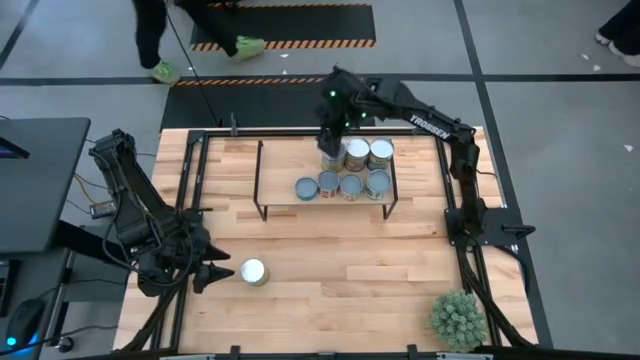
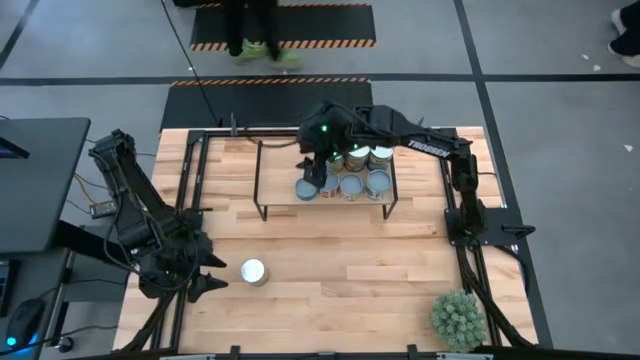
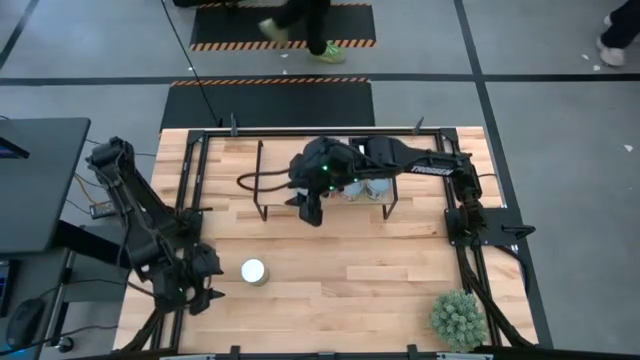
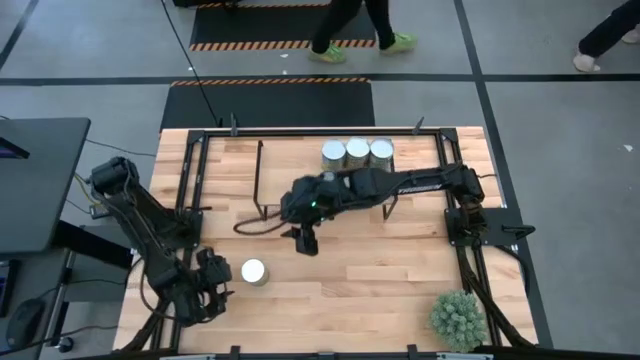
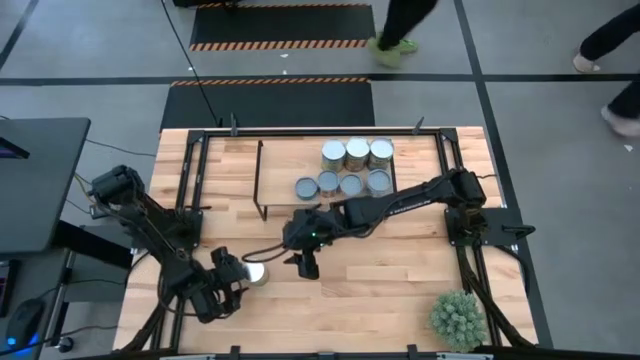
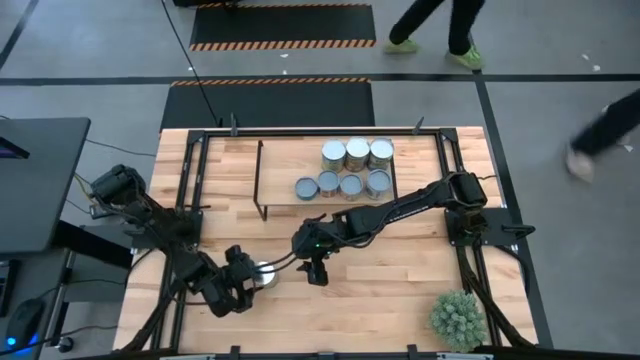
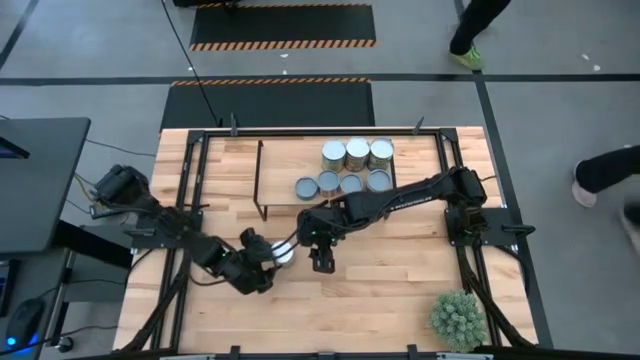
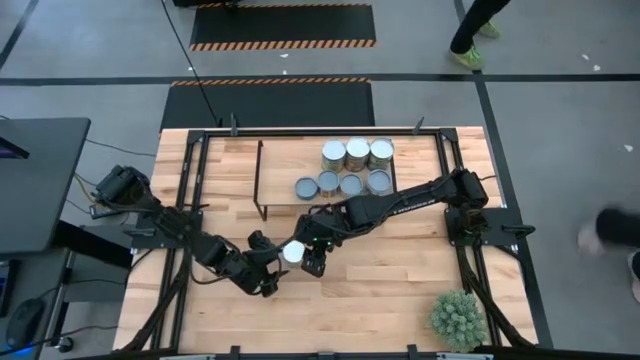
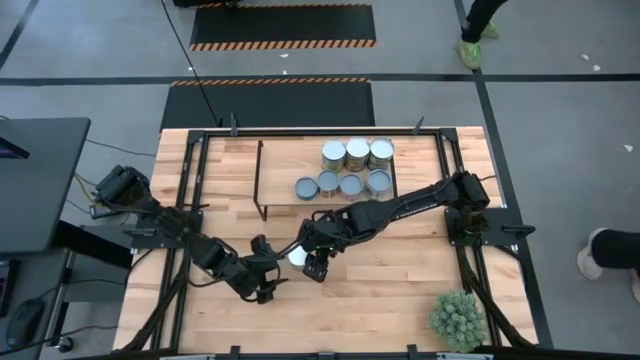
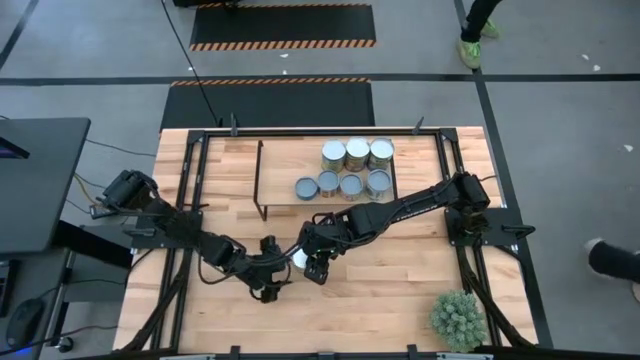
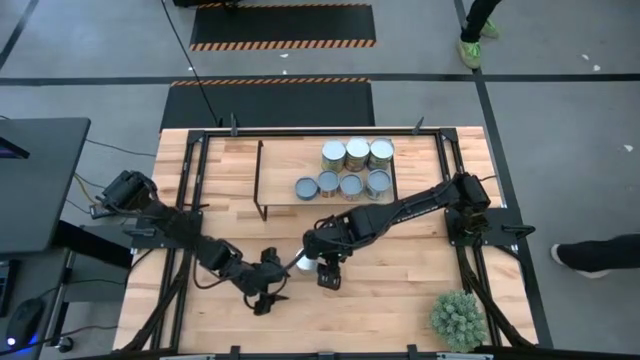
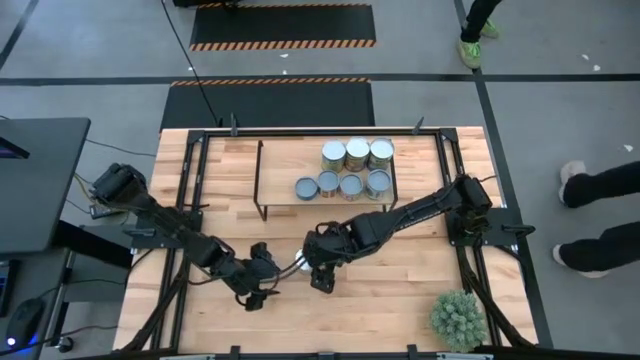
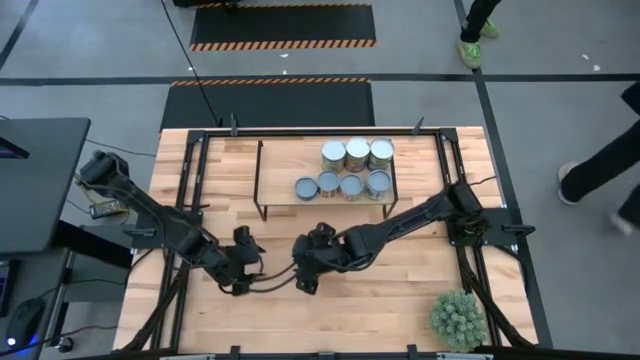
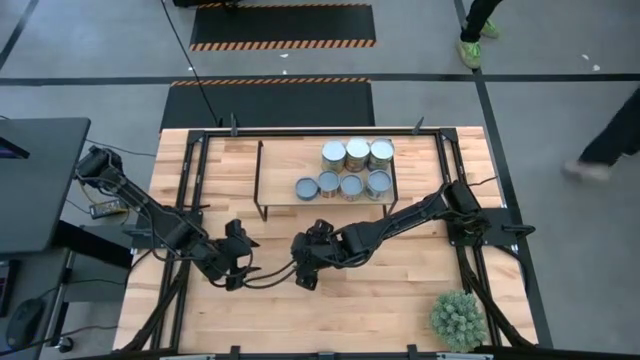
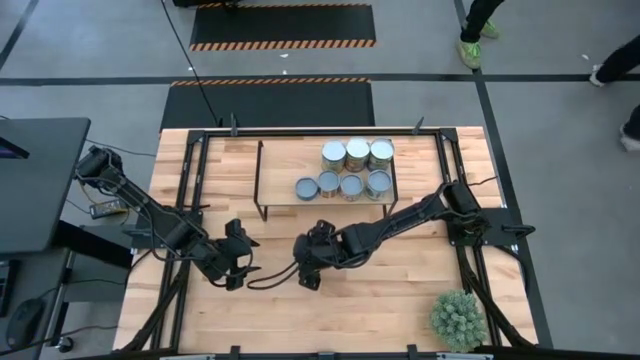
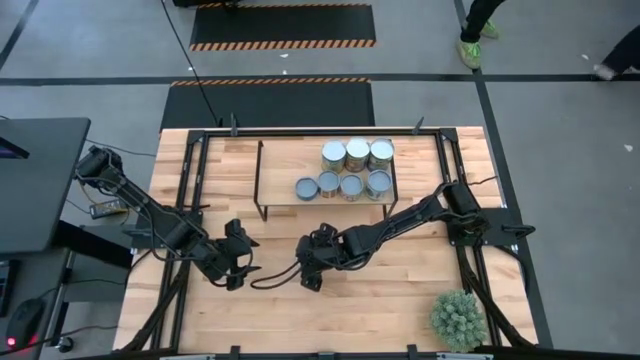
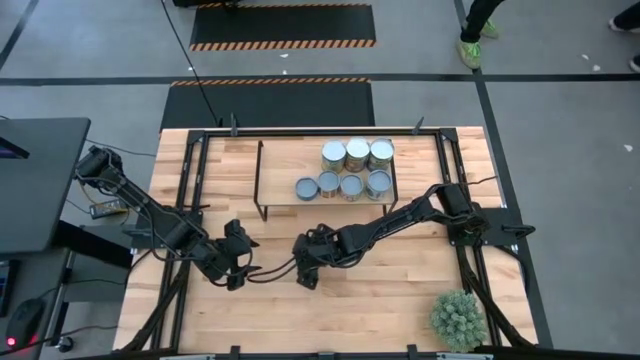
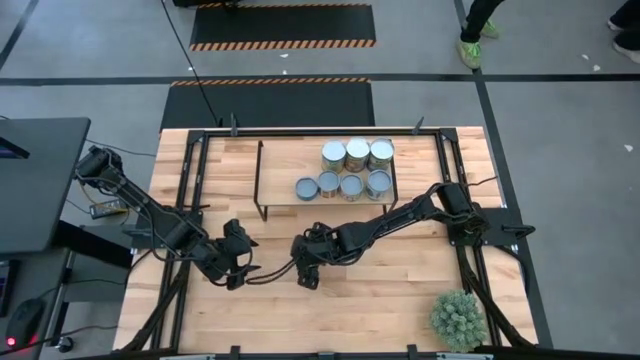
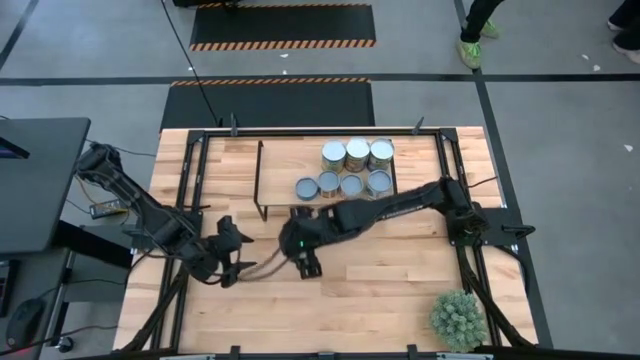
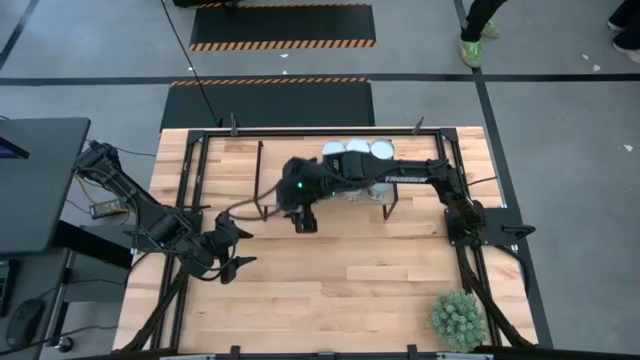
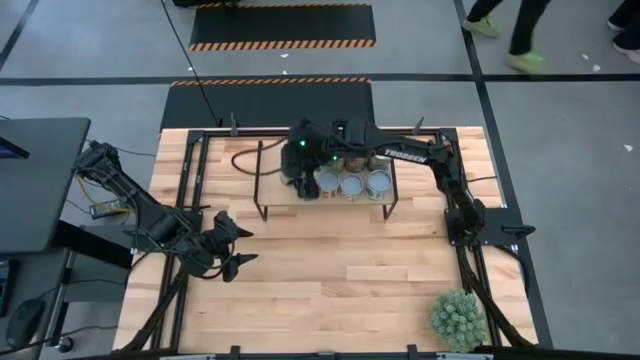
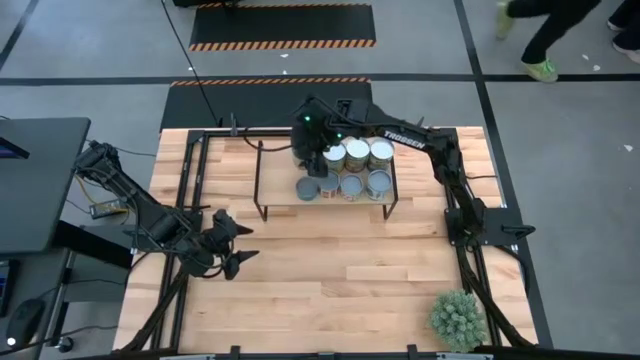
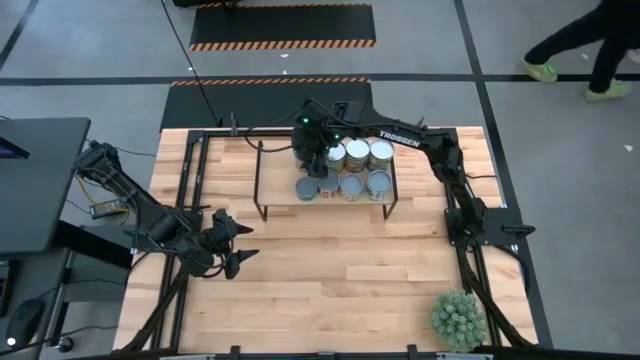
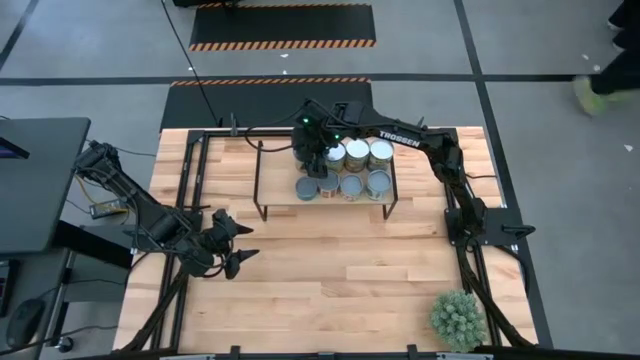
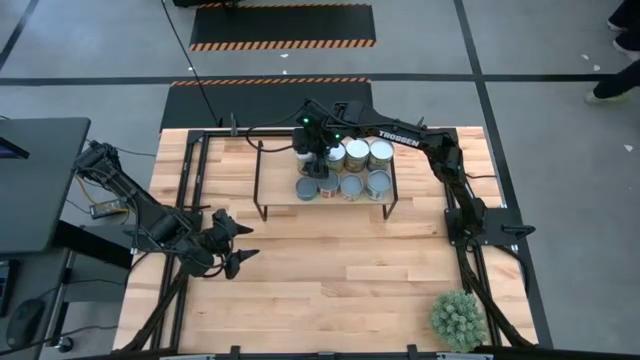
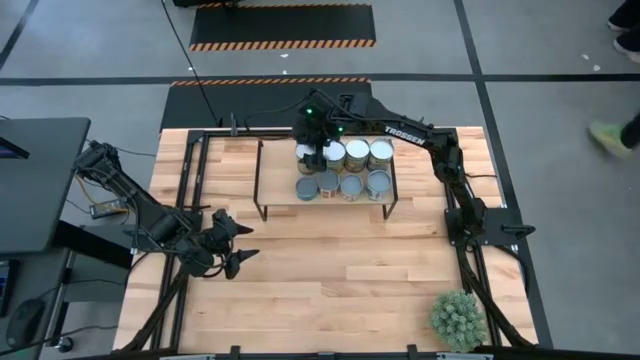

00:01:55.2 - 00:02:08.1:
Task: Pick and place cans onto a shelf
Put the canned oranges on the shelf

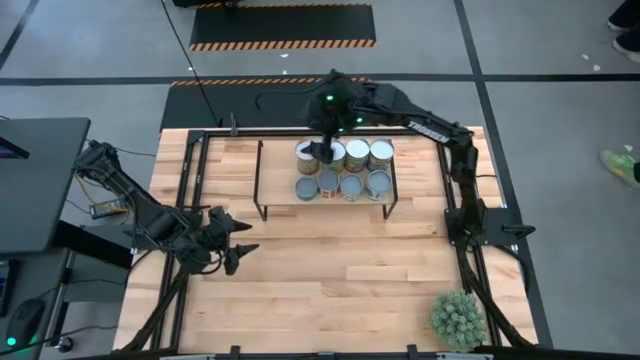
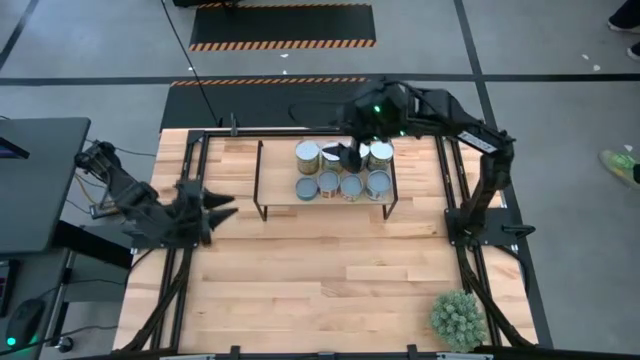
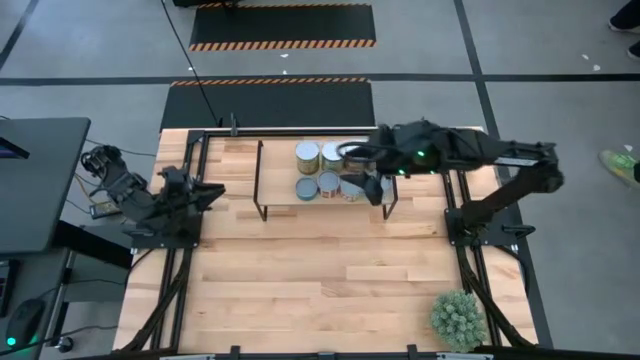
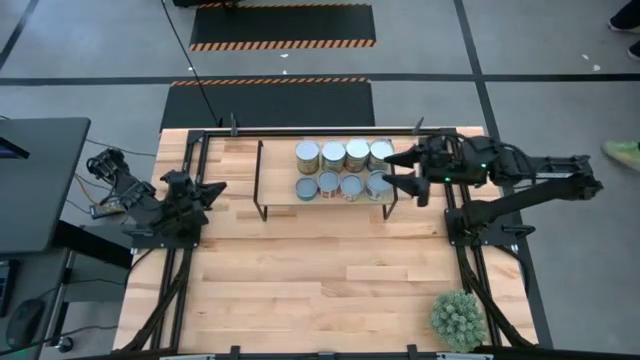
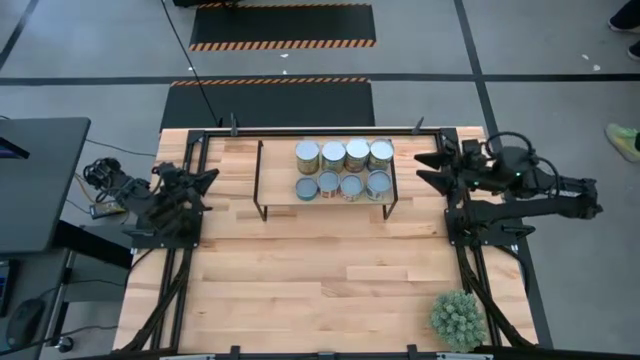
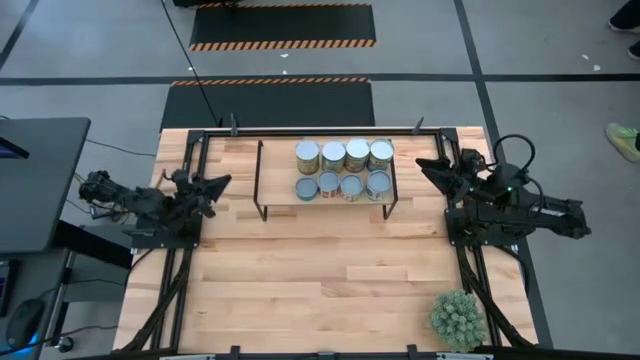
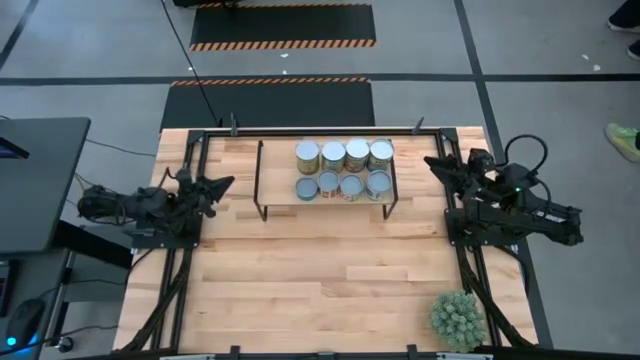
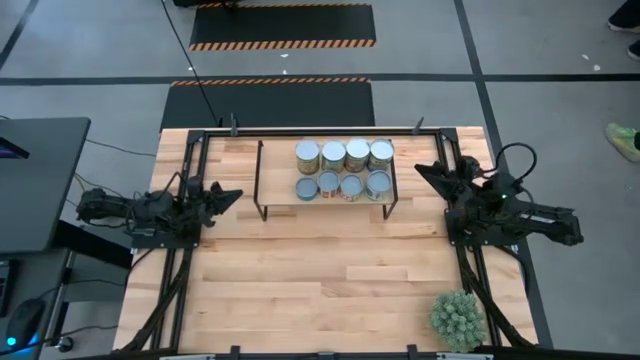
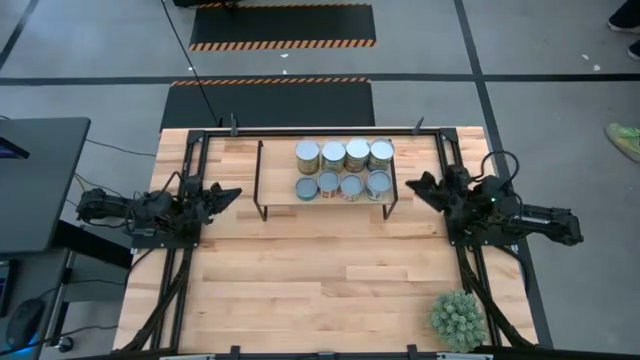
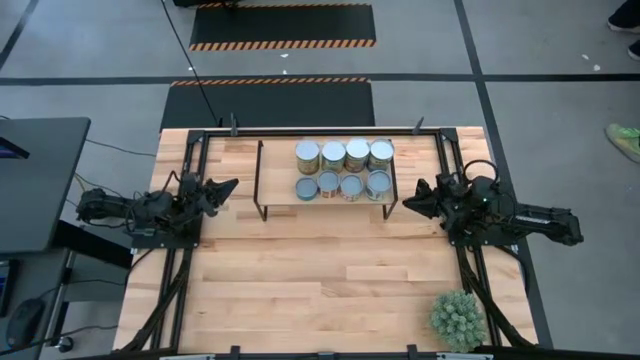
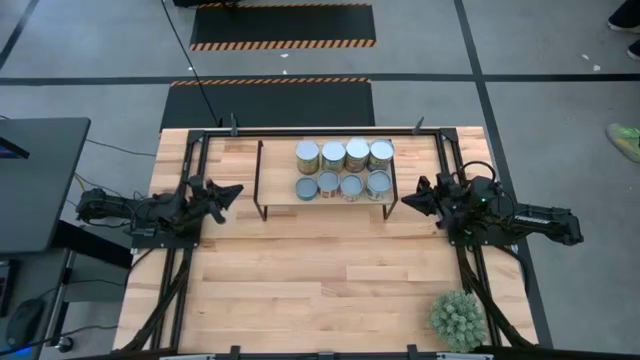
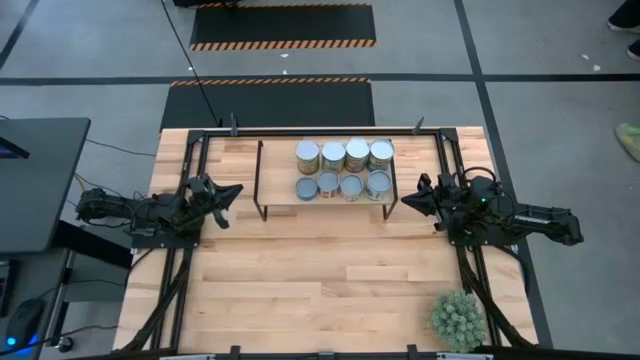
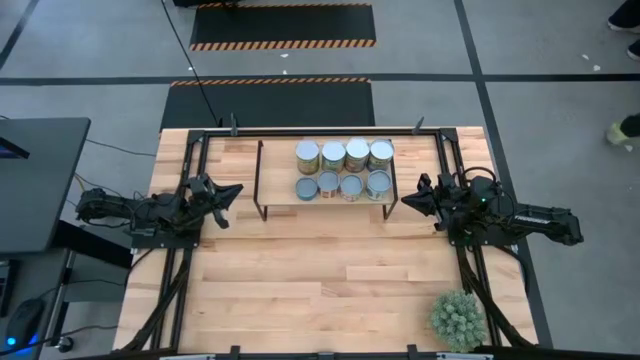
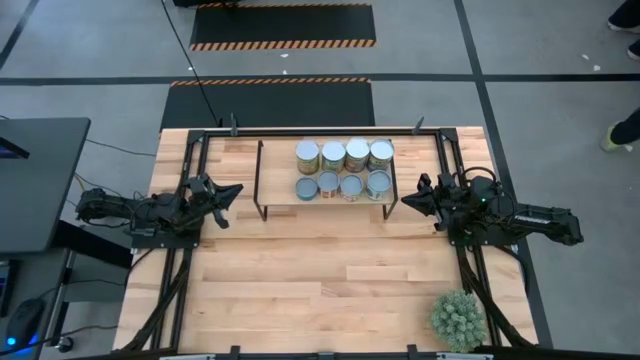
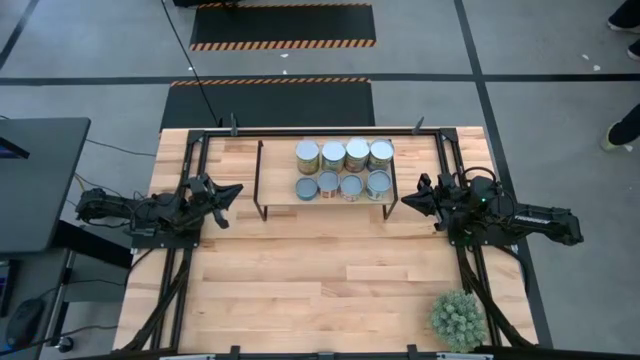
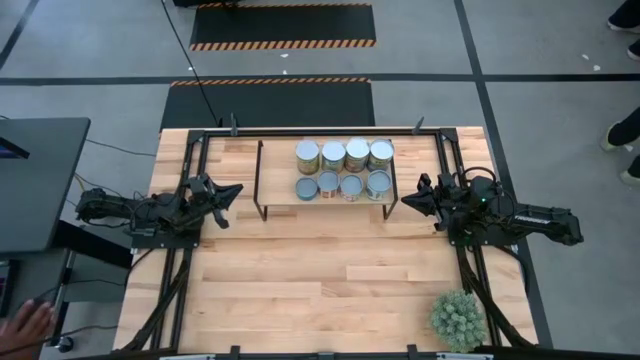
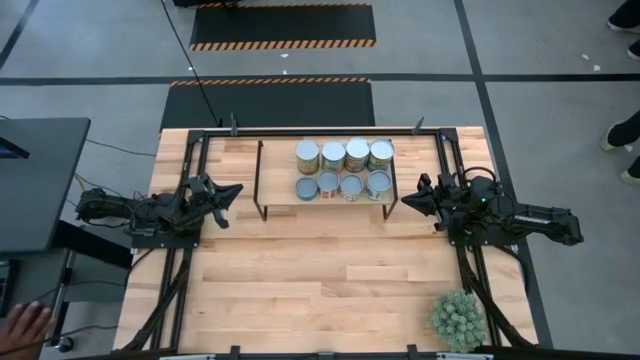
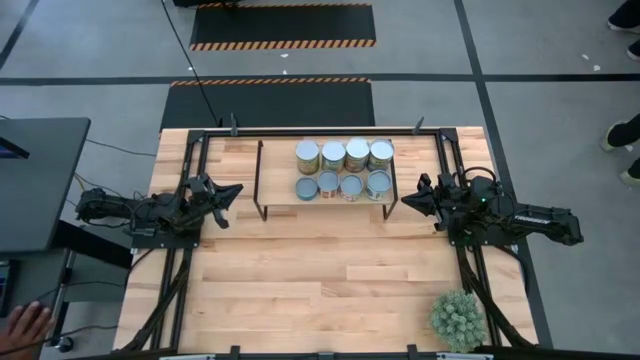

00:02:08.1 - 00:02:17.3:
Return to Home Position
